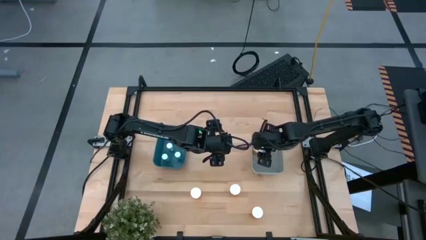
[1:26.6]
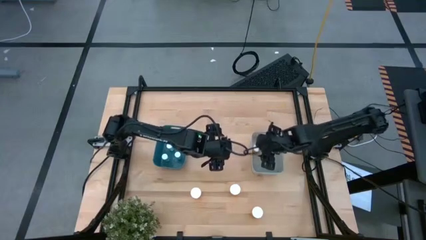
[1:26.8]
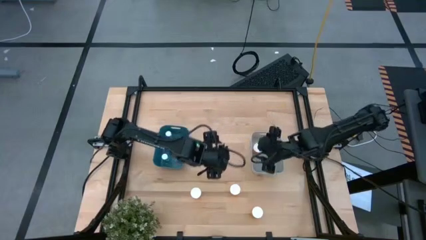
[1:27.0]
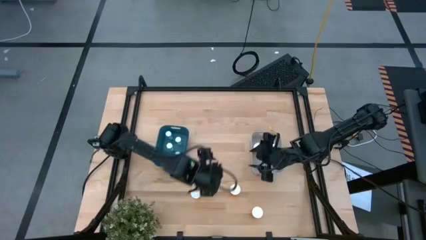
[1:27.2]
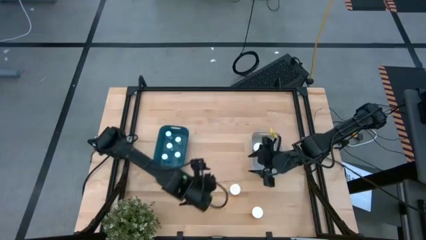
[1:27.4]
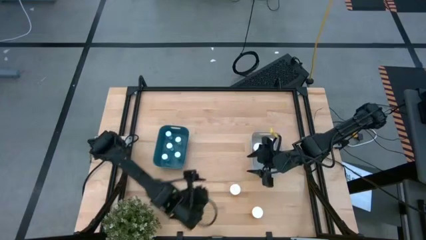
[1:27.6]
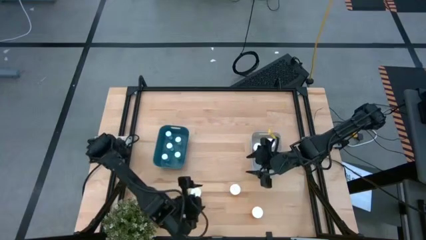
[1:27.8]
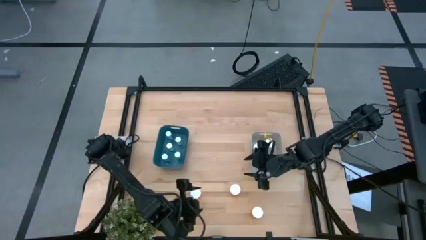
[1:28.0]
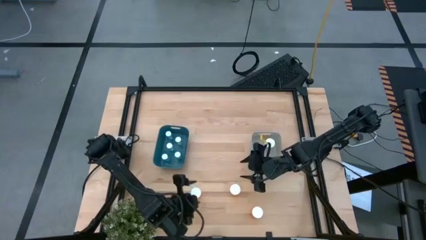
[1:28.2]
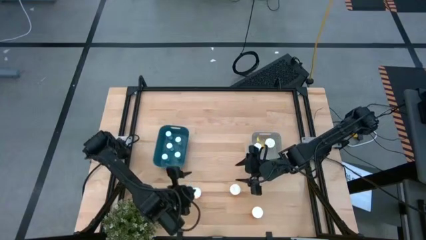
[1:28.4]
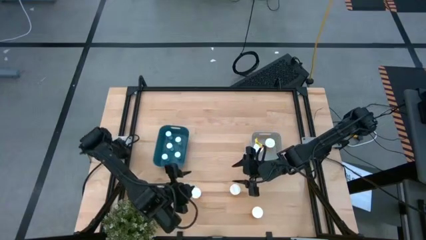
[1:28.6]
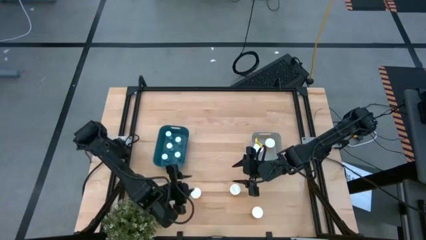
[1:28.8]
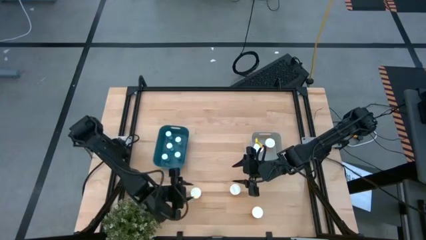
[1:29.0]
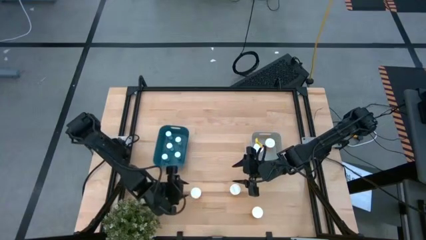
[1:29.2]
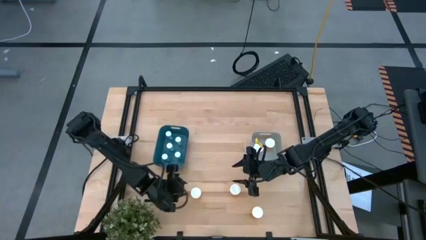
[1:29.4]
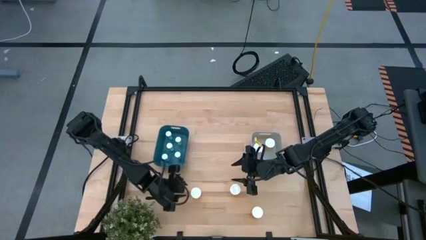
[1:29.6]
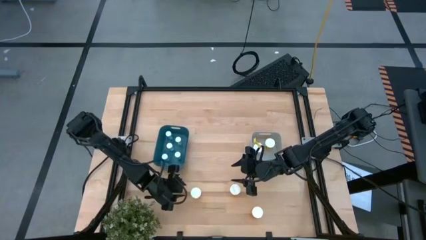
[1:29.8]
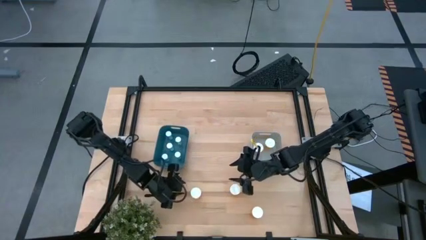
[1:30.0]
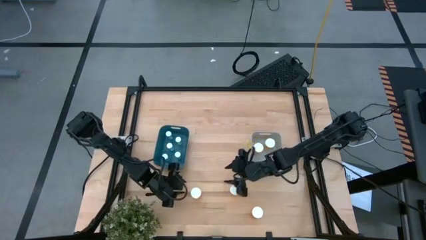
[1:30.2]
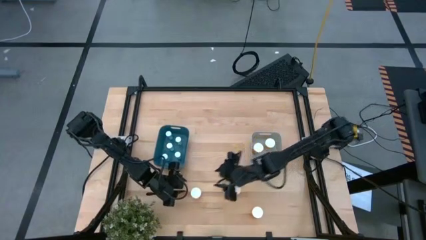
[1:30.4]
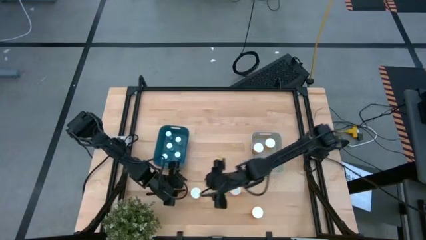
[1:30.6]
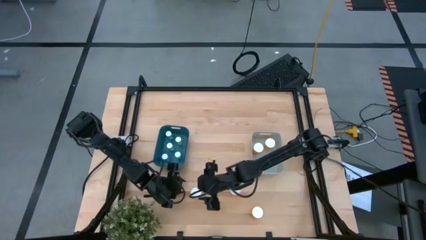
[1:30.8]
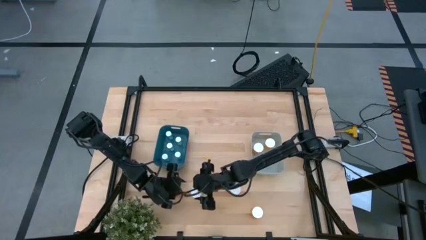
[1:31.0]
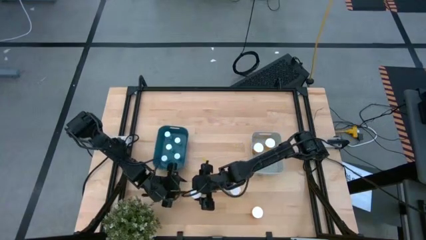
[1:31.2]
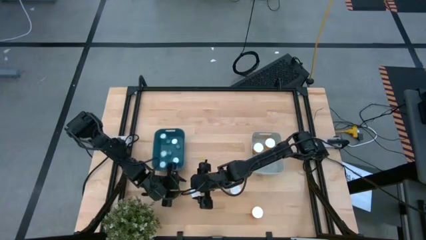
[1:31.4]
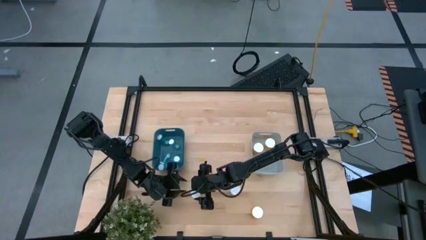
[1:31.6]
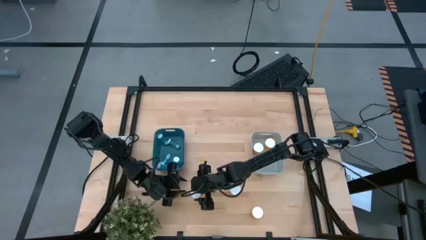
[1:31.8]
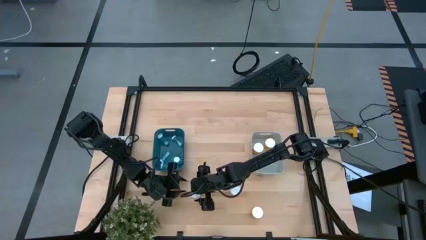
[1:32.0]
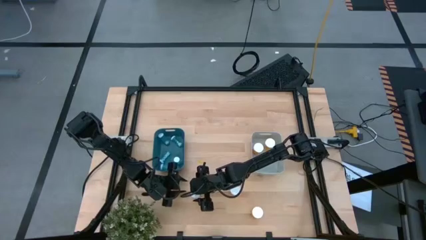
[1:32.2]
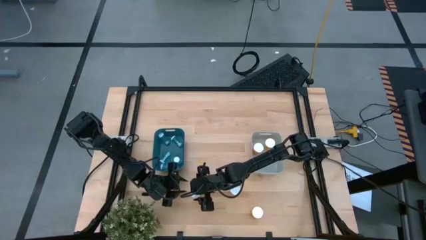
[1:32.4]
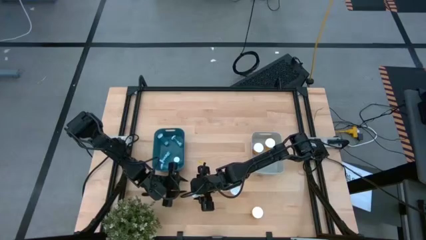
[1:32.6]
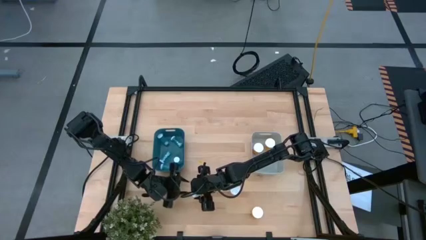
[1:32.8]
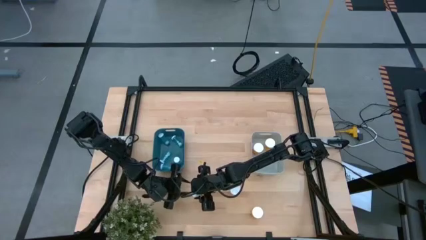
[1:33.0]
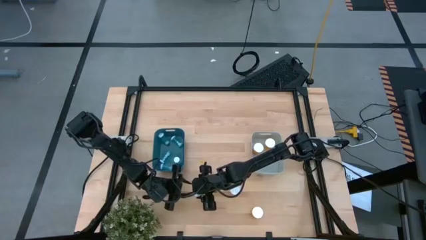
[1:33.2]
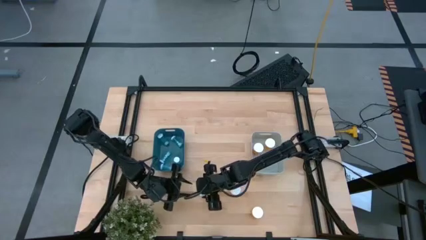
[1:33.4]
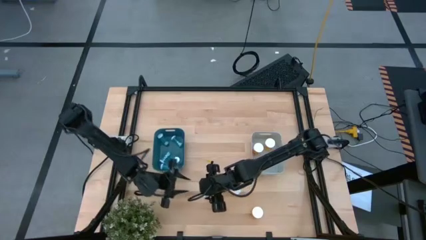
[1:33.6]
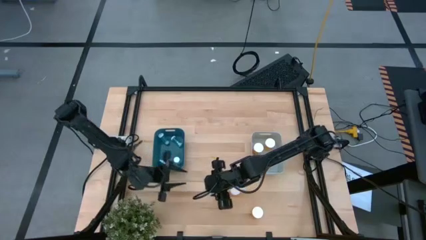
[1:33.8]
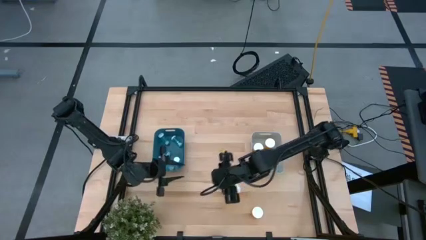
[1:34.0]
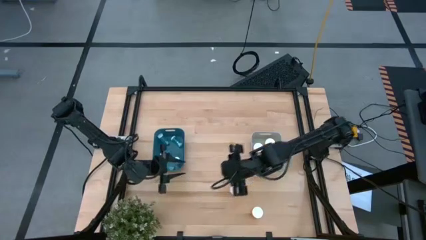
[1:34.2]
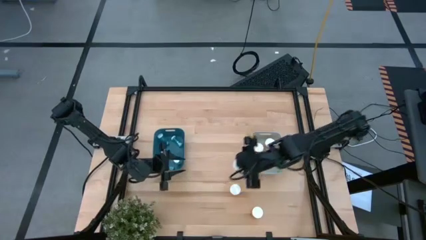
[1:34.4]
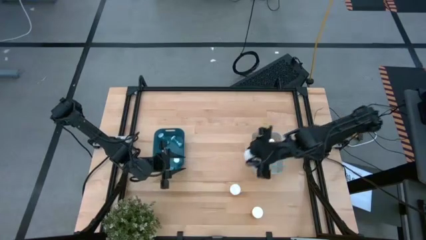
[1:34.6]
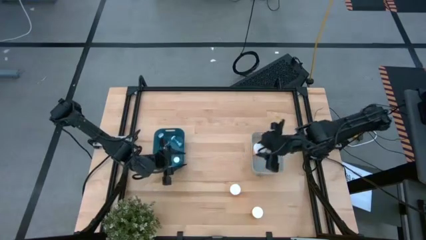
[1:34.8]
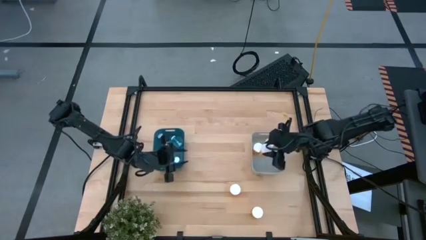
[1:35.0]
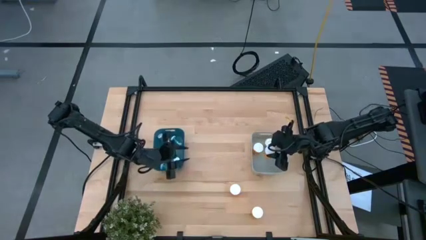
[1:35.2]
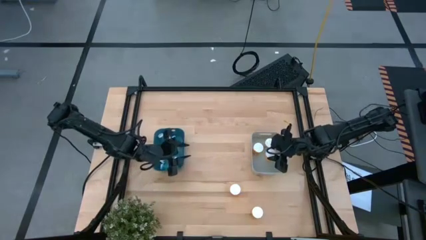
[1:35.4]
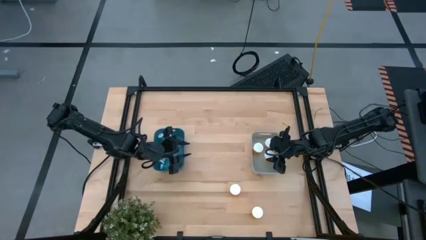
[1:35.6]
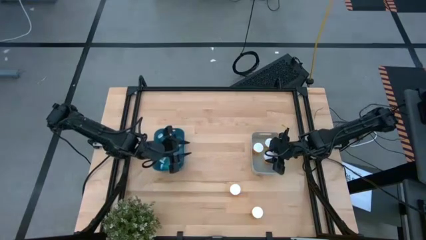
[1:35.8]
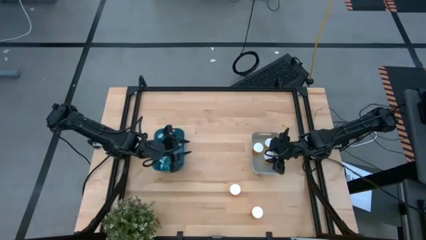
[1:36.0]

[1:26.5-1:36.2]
Task: Pick and place medicine bottles into bin by pill shape (circle, oval)
Put the orange pill bottle into the gray bin

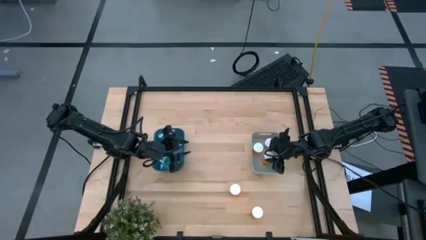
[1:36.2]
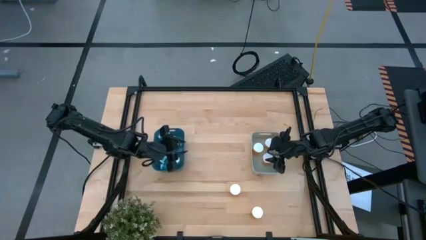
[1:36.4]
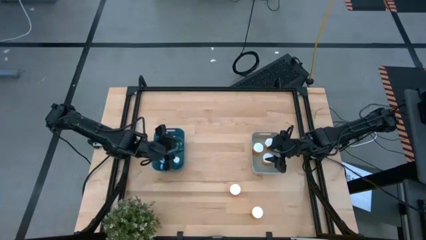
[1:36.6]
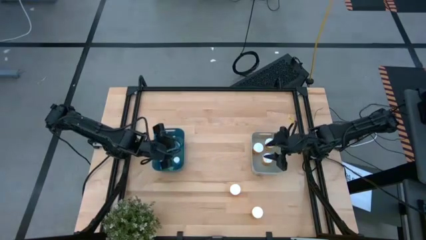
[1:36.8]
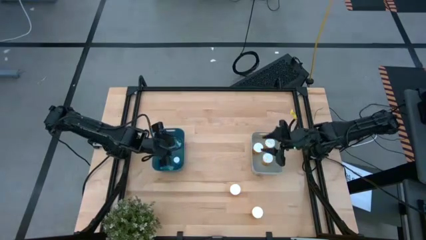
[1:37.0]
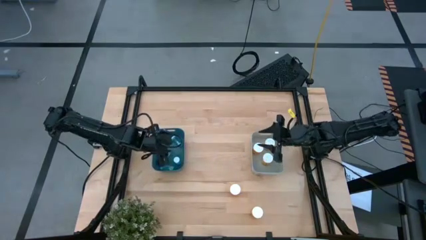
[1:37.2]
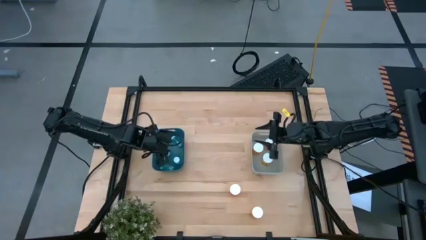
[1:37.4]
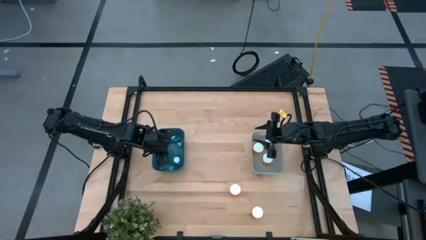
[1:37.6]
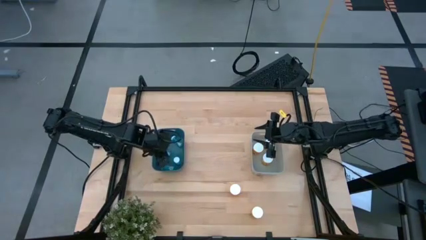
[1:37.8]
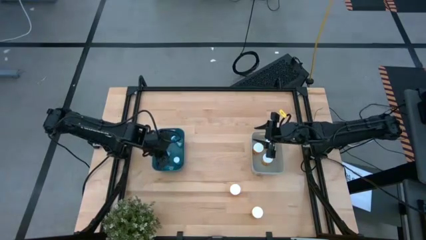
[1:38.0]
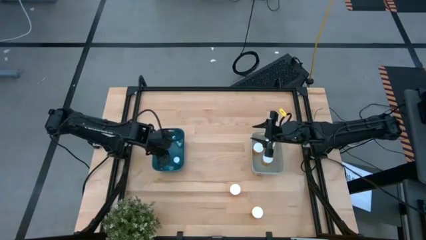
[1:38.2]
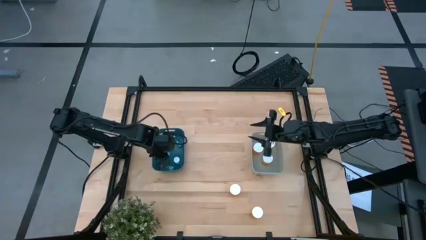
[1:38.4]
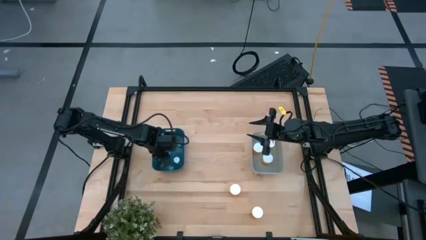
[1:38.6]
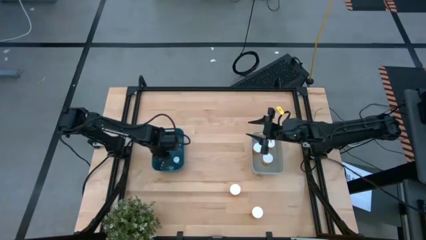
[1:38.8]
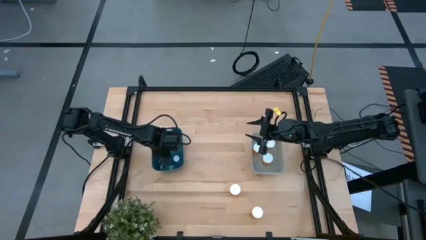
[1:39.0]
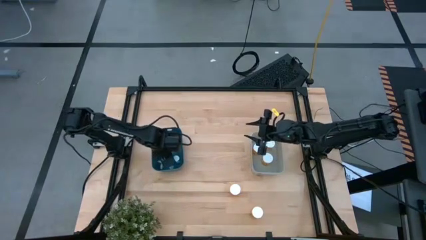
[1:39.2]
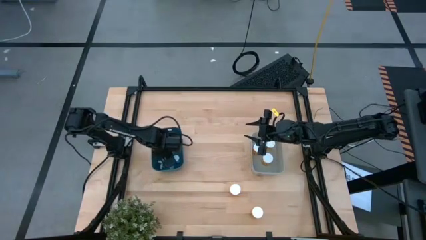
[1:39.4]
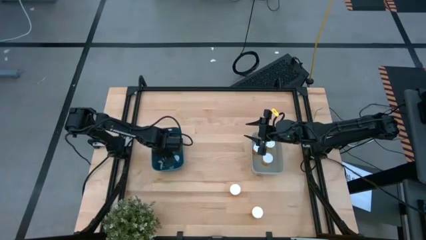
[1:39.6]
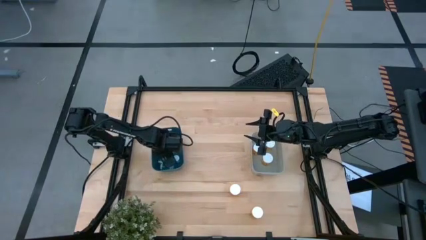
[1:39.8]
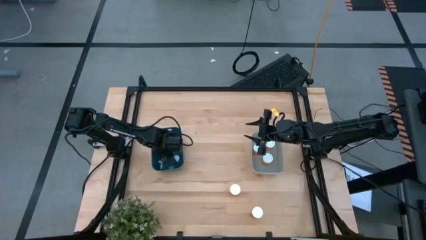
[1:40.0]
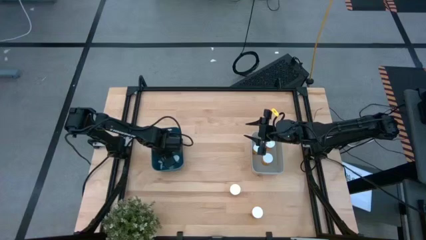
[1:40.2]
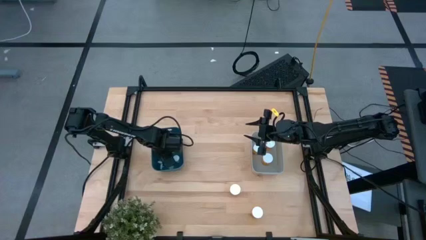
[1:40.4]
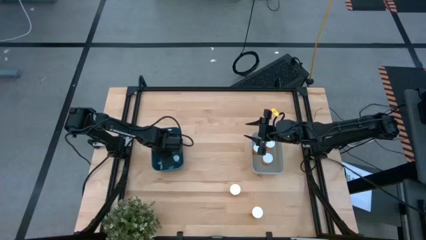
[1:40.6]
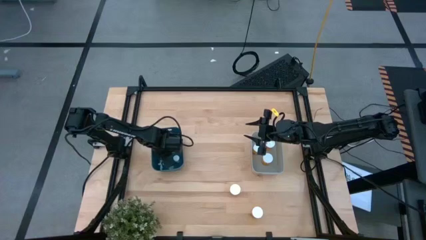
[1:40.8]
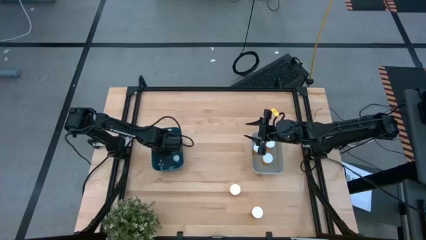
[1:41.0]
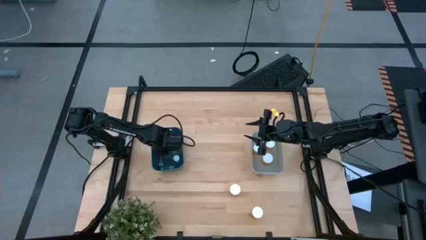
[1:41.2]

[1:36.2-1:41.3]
Adjust the blue pill bottle

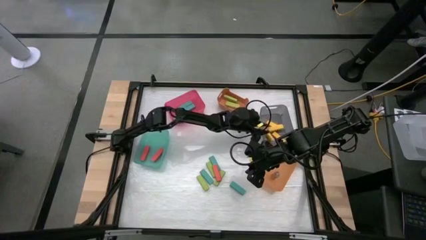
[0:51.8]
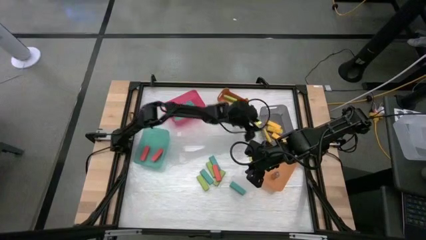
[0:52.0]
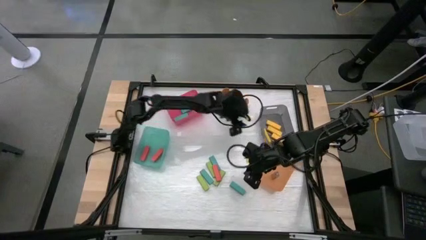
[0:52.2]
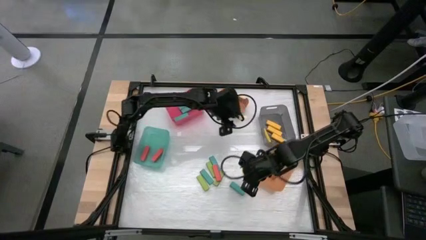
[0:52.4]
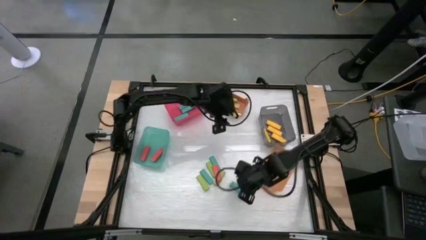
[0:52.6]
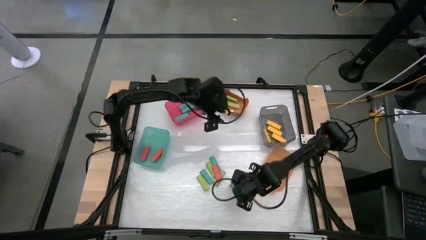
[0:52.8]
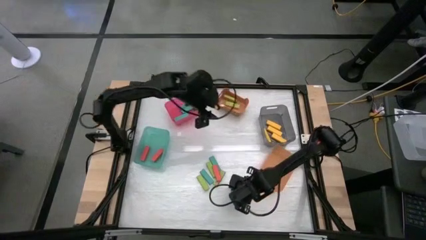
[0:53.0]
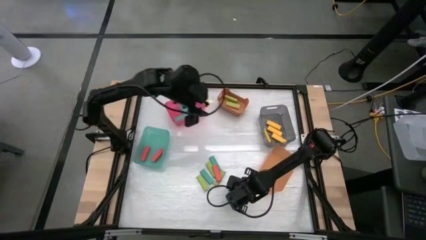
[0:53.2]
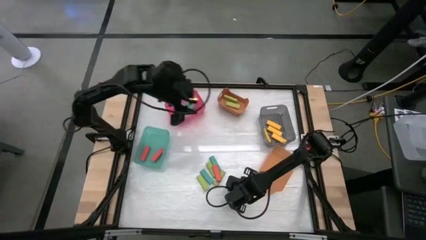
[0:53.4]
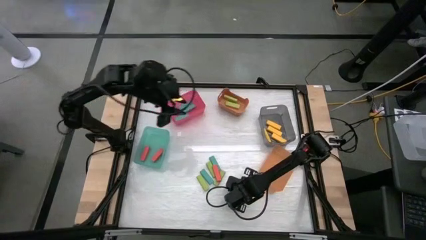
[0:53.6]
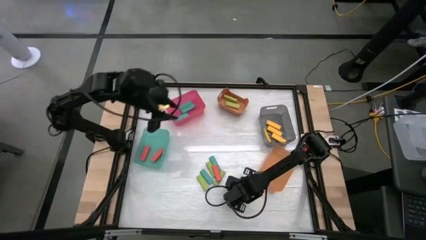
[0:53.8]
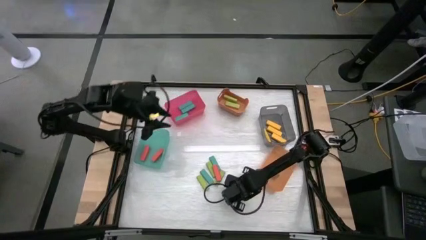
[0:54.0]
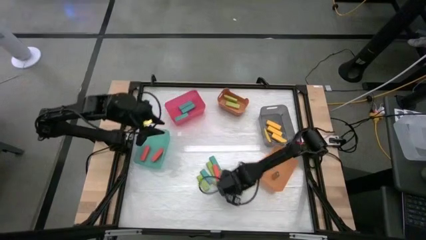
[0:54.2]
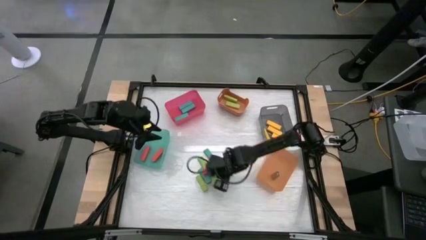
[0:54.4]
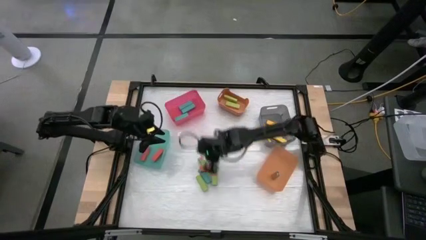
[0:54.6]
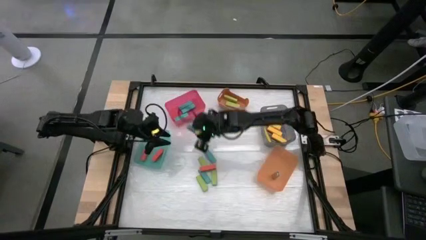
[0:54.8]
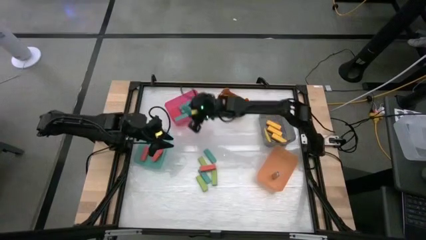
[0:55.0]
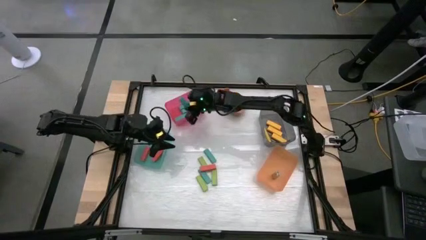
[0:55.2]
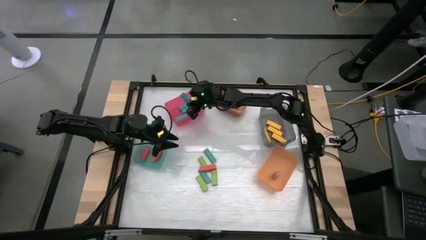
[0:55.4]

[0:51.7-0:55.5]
Task: Sort blocks
Put the blue block into the pink bin
